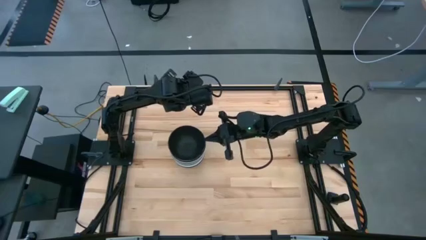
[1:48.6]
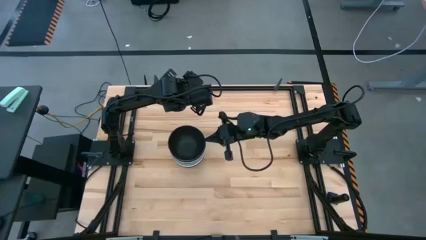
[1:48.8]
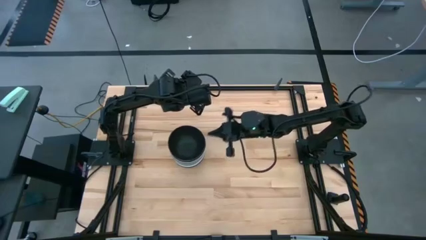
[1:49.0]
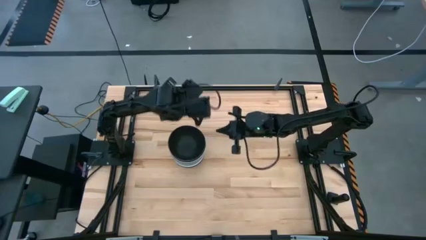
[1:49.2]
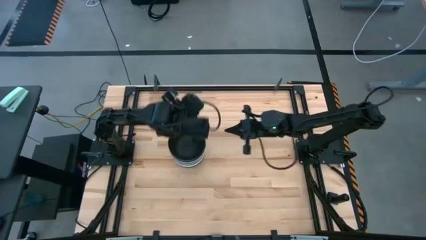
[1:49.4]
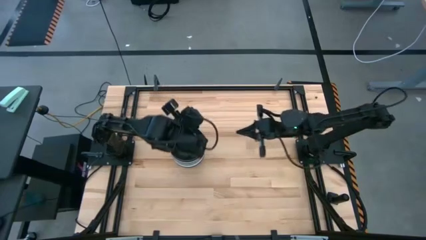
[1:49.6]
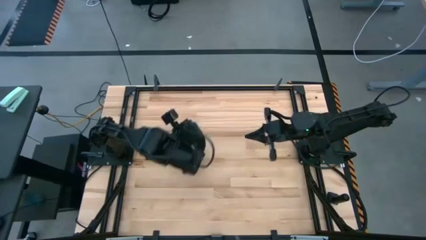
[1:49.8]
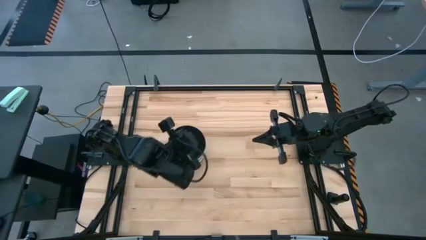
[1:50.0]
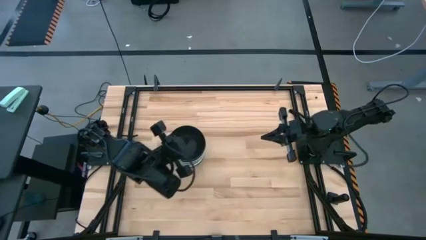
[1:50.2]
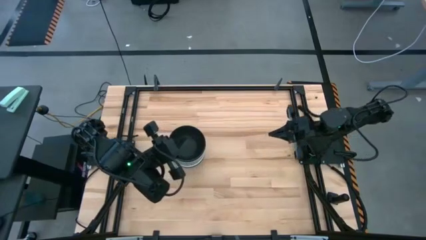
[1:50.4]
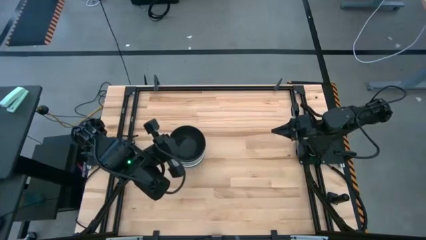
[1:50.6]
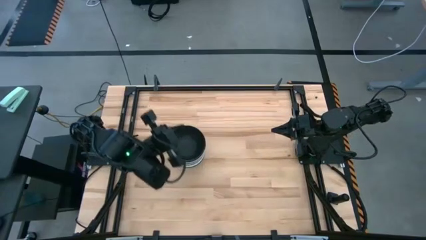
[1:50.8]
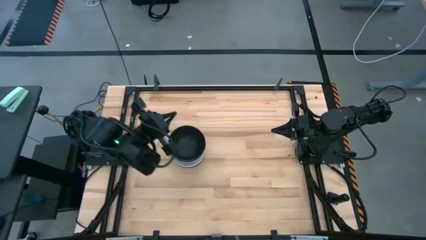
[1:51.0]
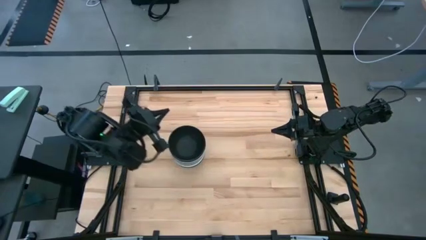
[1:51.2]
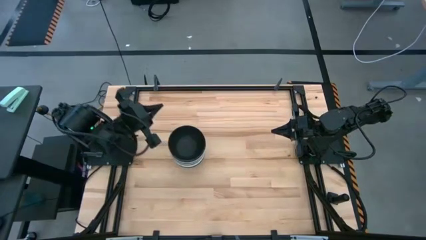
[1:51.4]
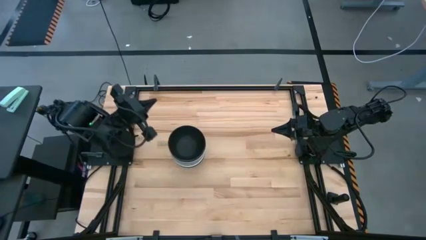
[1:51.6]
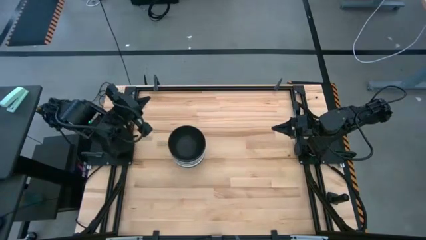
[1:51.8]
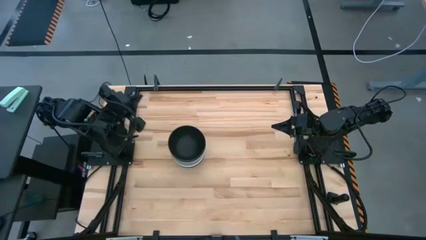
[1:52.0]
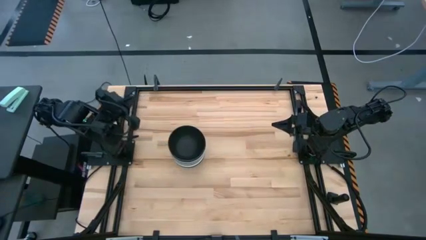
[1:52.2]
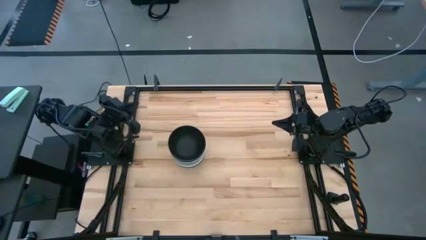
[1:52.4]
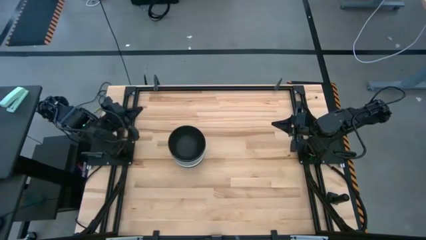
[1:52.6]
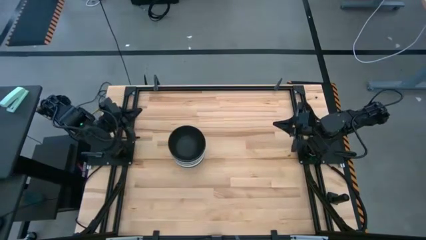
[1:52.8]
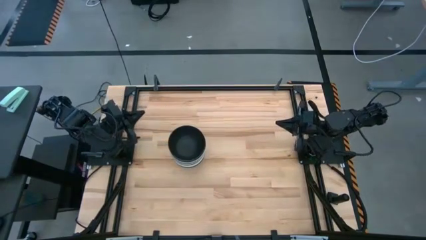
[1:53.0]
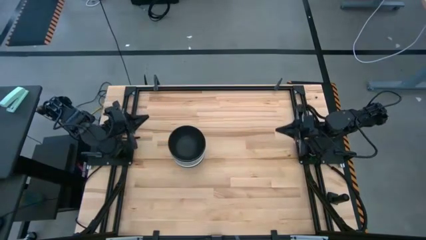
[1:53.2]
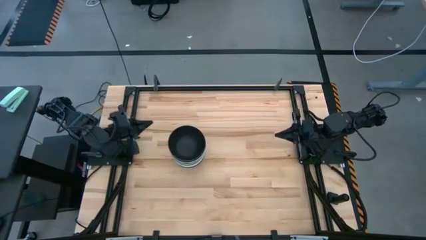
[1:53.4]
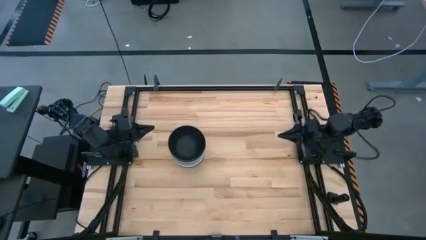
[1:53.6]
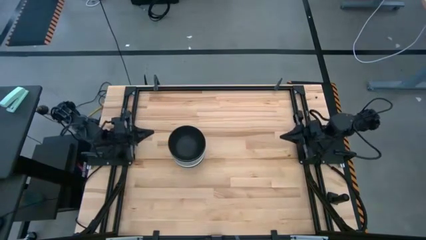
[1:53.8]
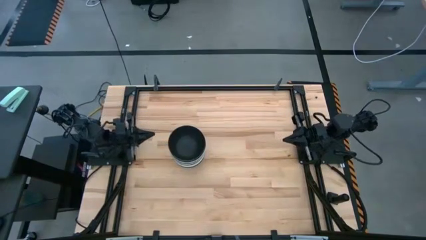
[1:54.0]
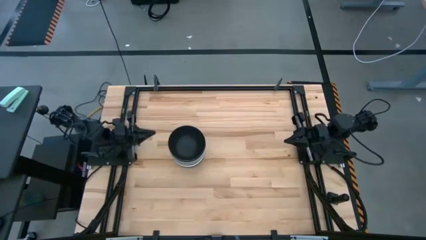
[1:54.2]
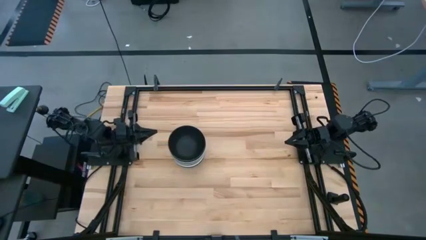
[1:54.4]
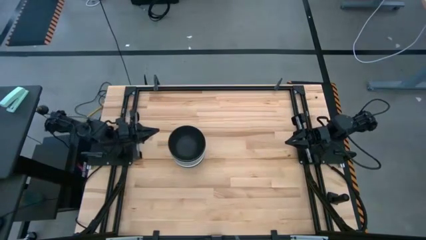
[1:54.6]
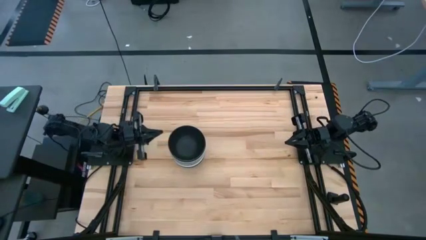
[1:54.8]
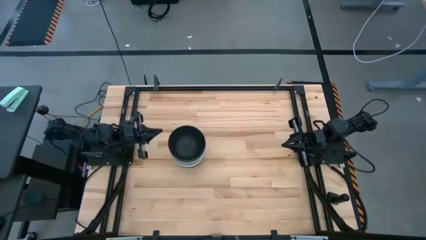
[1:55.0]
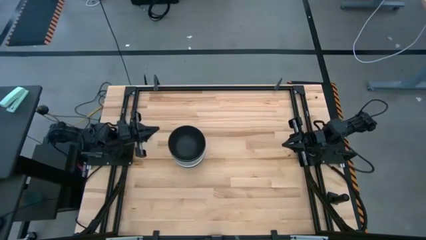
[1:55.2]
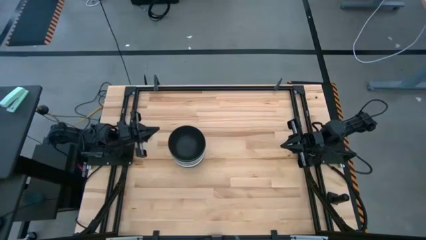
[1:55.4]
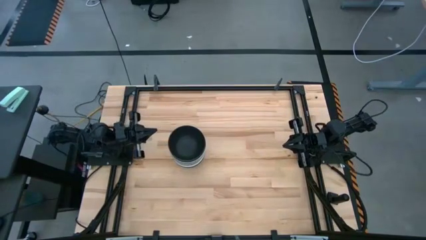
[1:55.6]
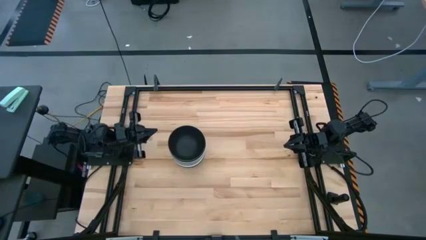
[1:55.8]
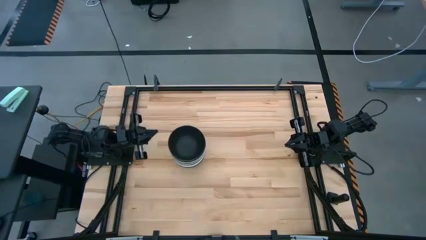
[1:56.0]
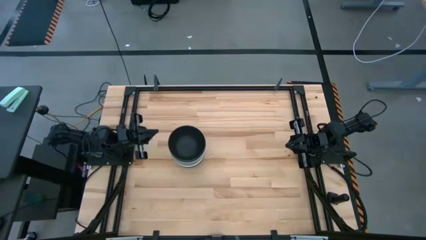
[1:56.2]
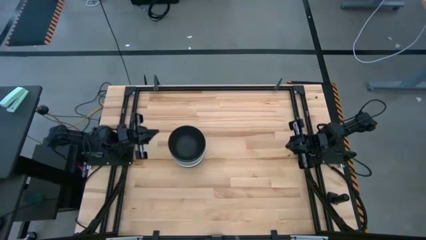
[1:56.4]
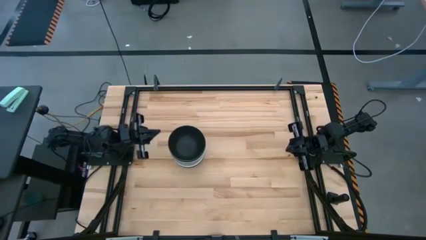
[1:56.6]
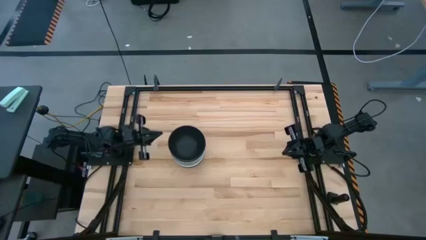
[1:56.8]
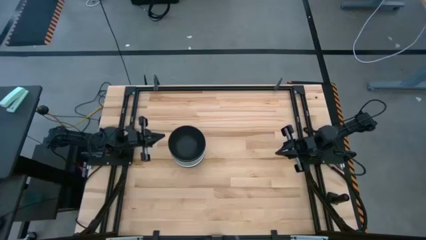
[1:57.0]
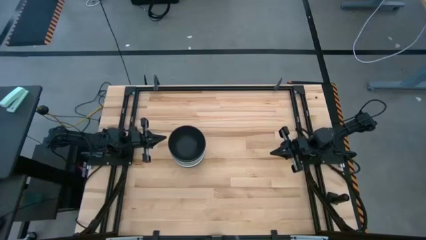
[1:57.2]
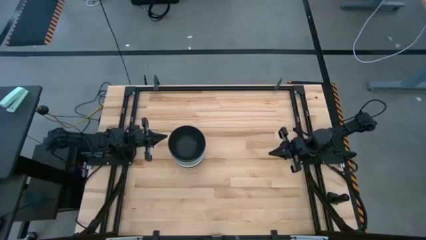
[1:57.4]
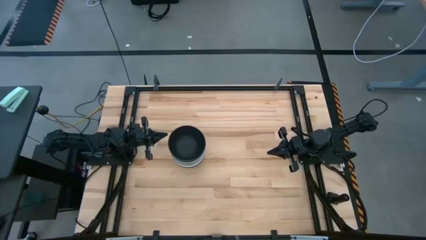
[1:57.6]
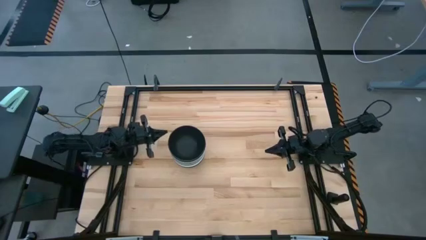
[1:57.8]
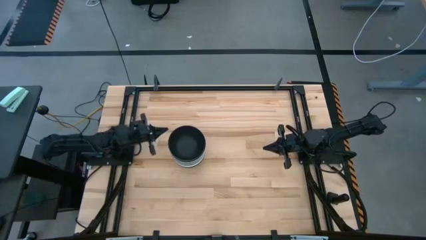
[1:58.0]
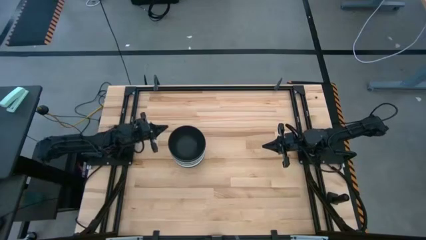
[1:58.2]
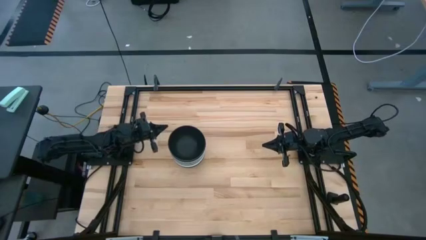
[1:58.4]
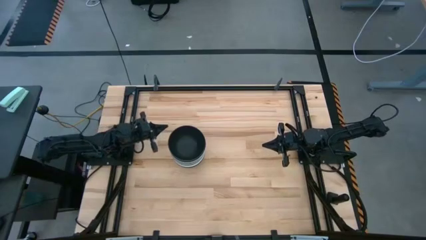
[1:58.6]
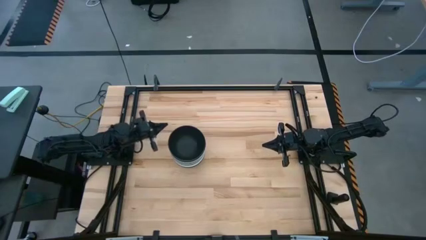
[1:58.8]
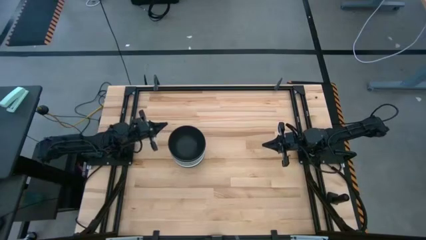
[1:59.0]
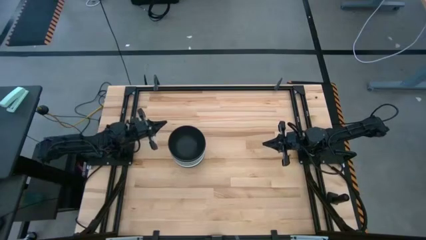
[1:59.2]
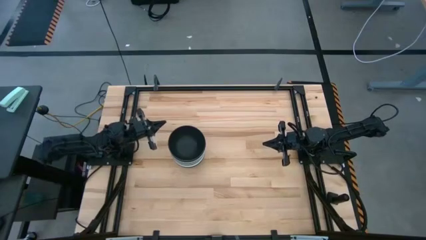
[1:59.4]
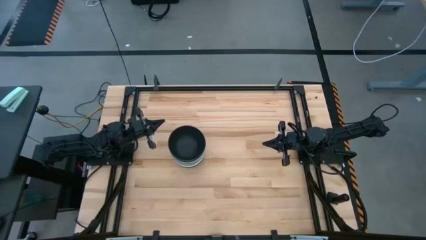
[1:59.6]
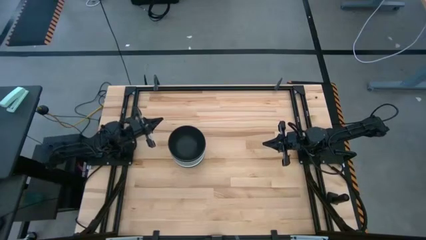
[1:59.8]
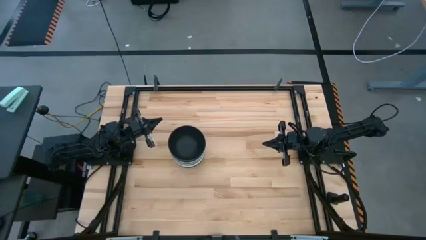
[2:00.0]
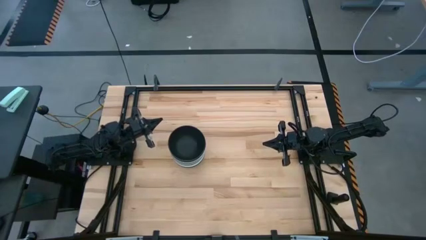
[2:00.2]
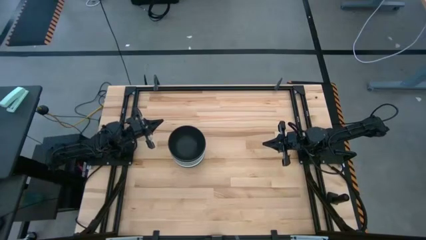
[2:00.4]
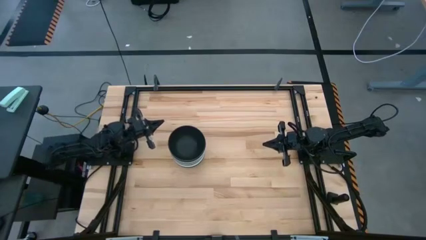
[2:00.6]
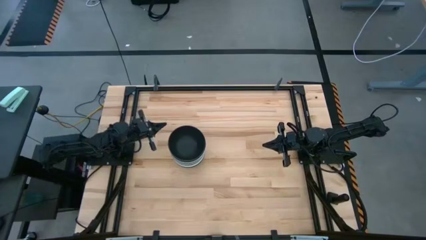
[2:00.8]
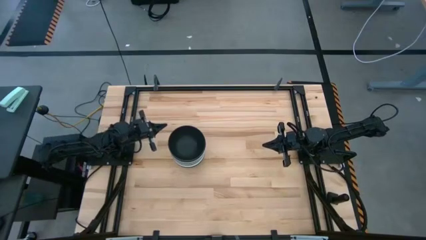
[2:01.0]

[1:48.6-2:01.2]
Task: Nest bowls inside each other
Return to Home Position

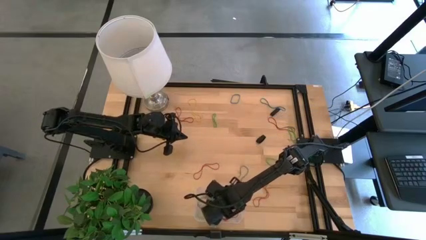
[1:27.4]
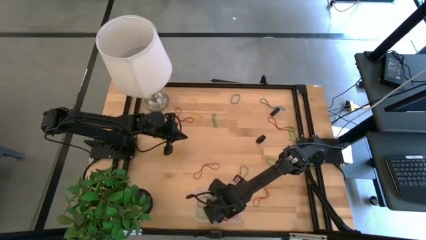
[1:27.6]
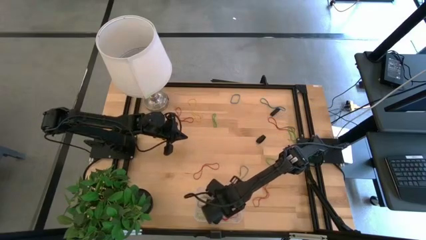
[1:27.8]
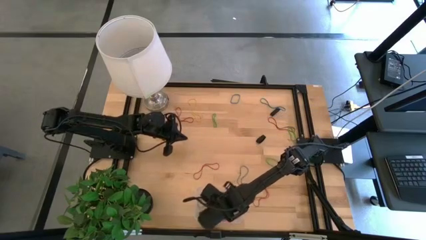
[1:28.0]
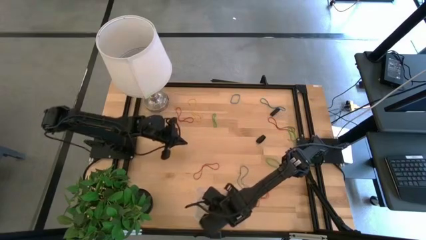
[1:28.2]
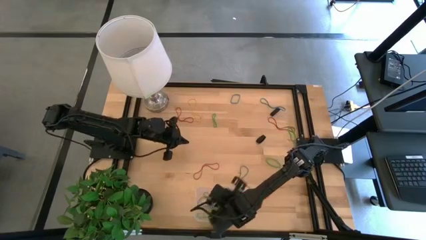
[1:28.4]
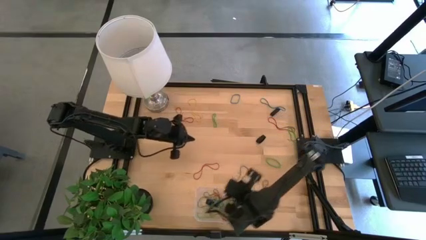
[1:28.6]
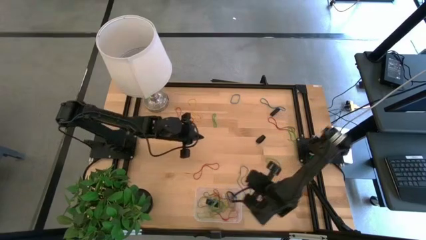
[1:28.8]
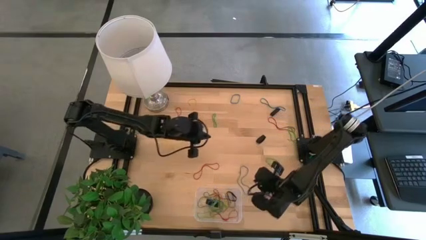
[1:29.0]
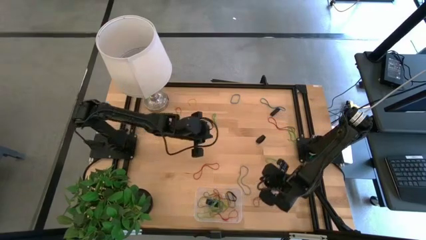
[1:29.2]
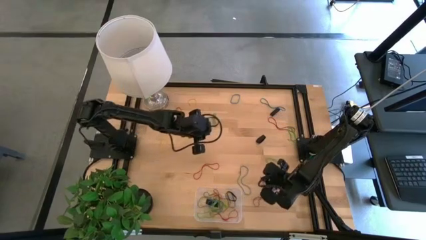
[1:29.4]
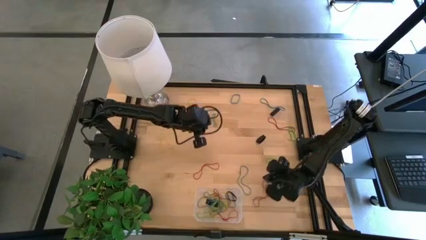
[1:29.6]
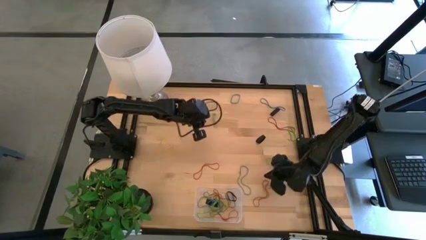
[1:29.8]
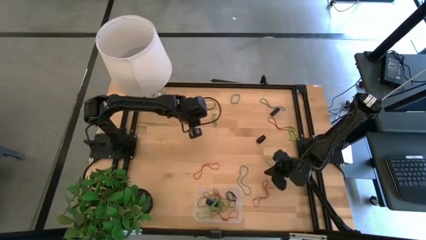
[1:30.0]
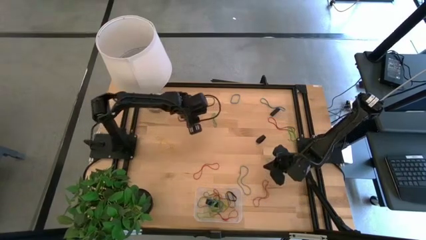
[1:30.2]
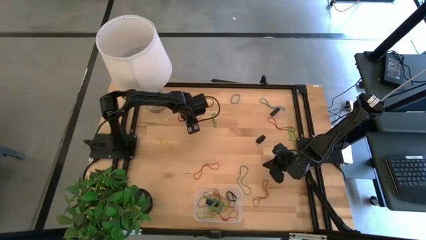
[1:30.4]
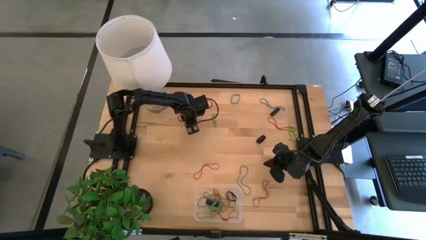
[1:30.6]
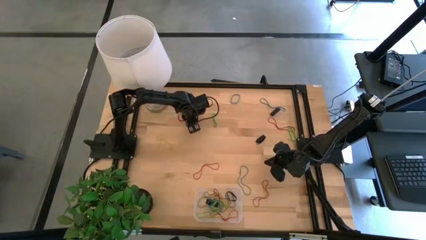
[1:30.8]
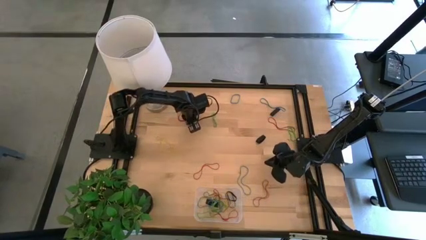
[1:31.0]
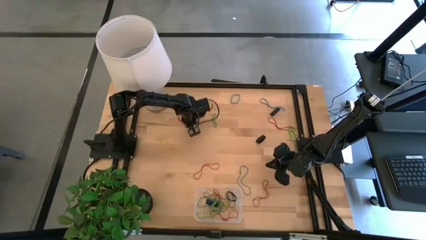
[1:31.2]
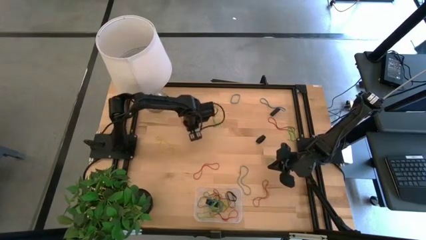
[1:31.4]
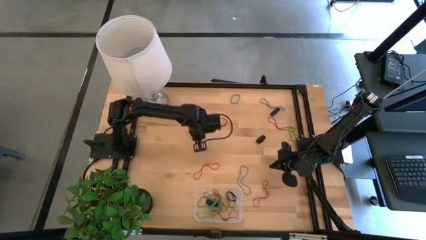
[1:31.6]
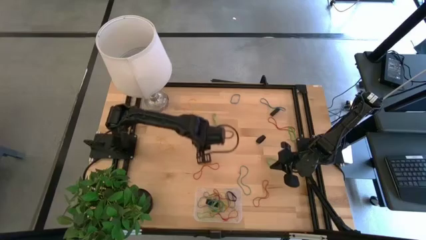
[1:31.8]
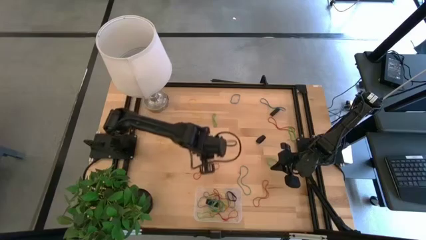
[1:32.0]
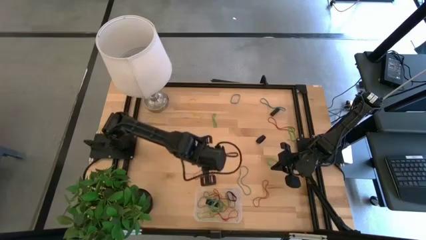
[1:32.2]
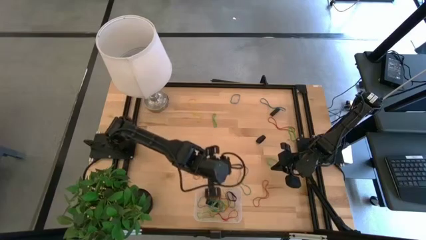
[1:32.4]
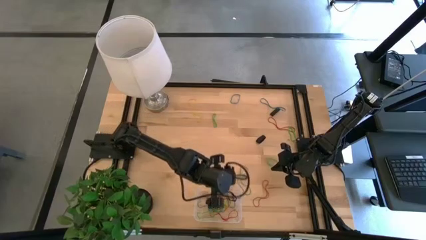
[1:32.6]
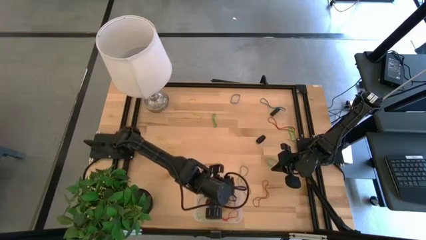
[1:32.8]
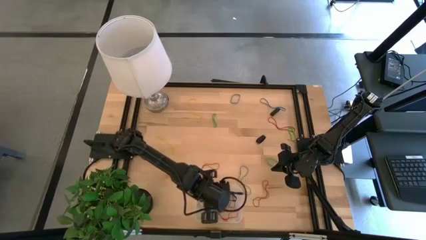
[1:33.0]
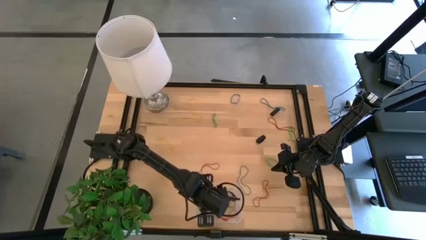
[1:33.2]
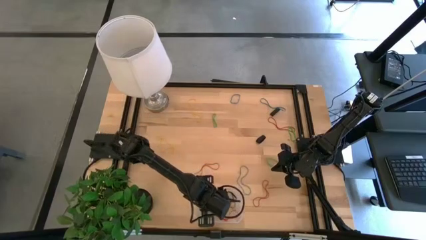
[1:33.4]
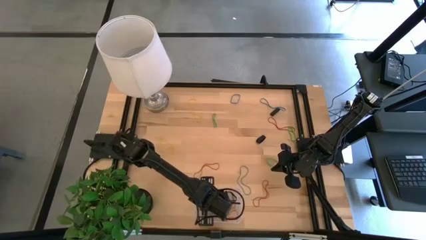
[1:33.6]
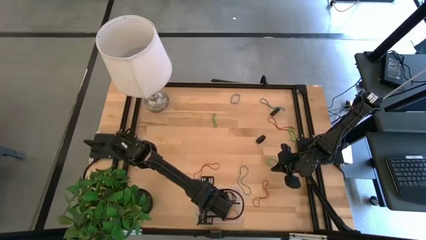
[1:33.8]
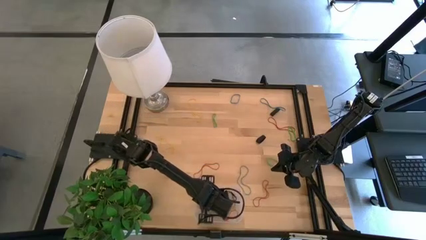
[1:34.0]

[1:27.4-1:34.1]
Task: Pick and place rubber bands into bin
Put the red rubber band into the transparent bin
